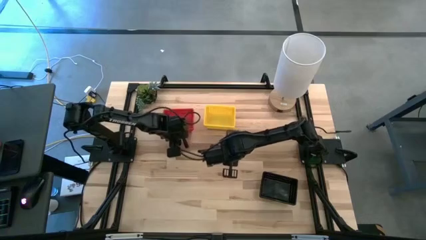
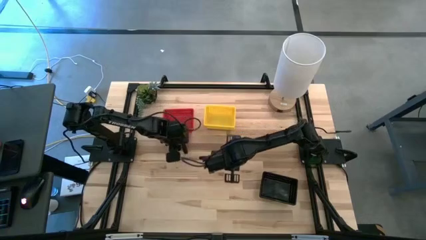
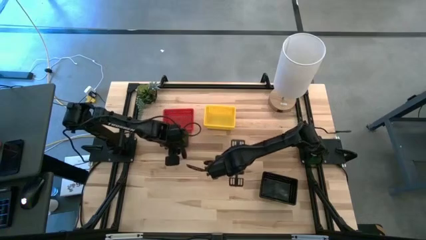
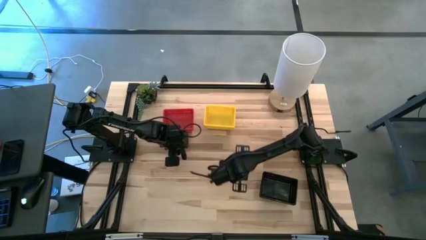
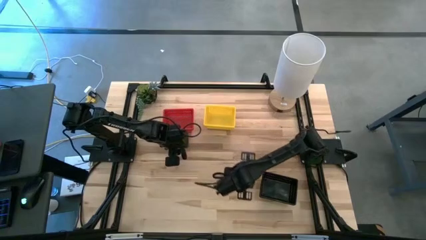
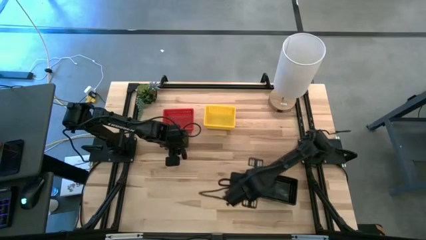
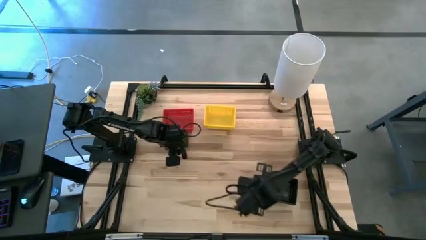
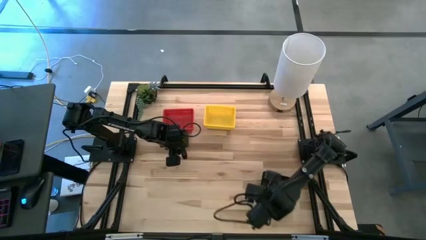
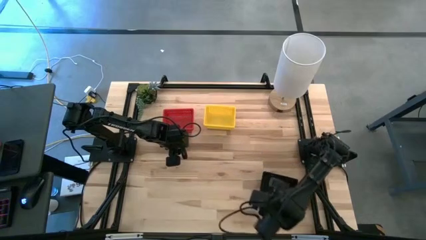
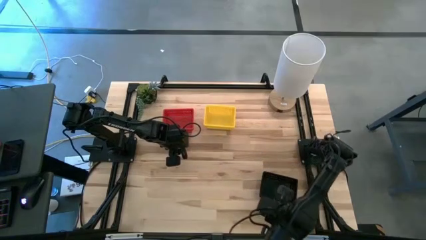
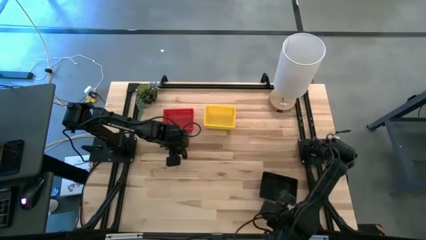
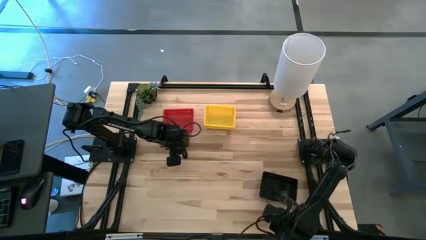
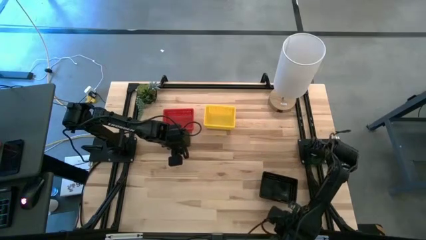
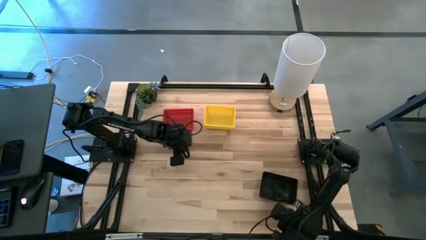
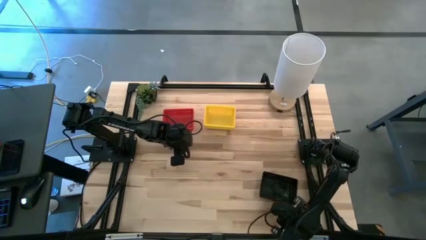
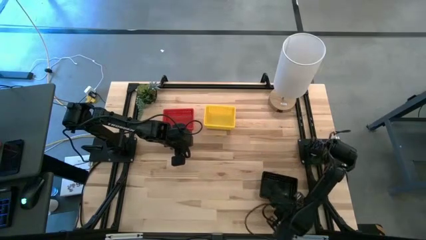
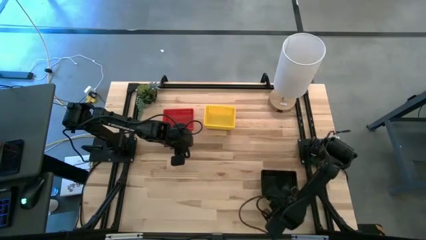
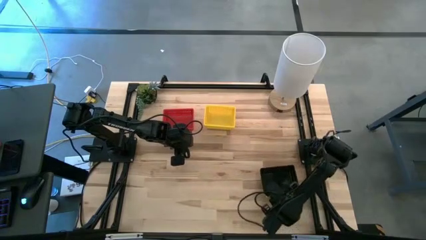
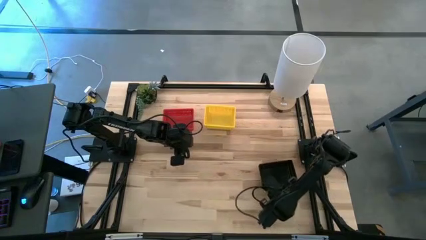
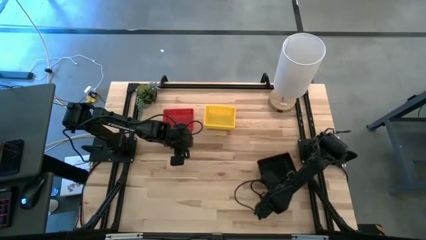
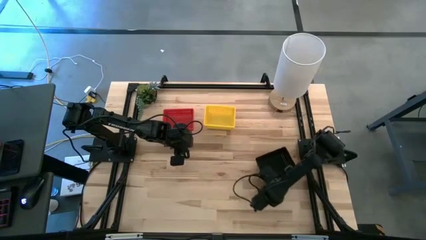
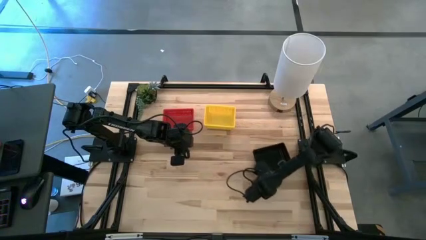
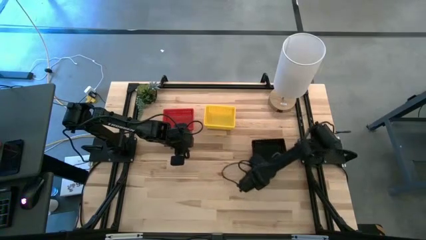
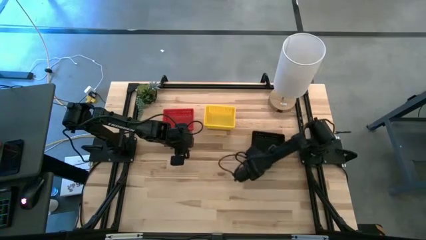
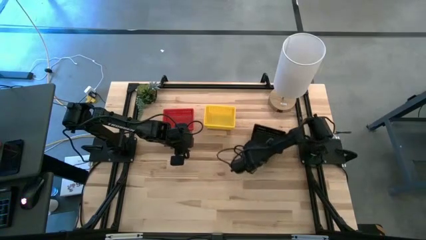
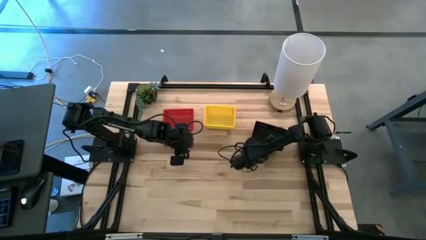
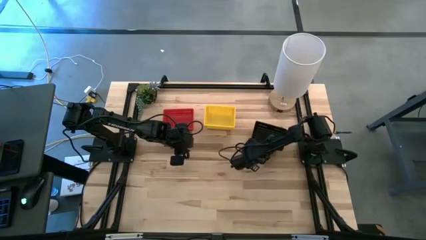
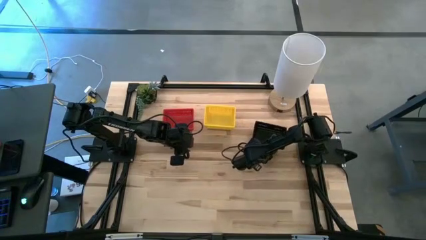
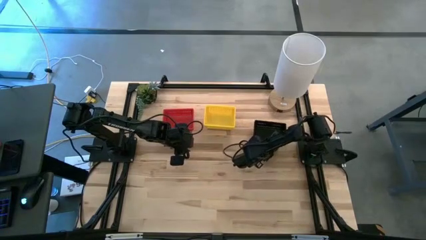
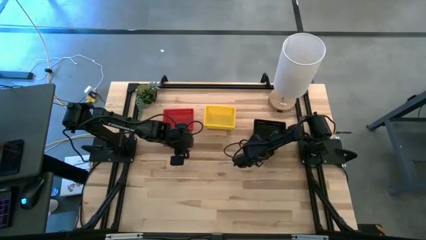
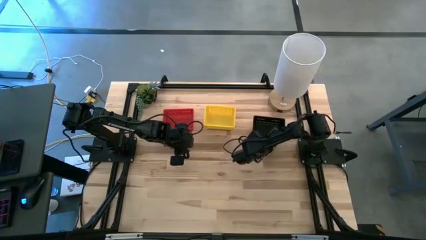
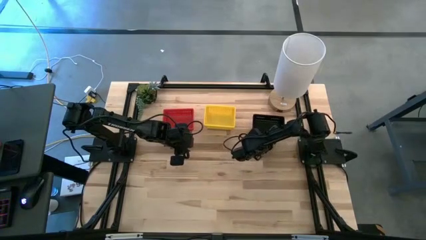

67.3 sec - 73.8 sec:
Move the stacked black bins to the top of the table

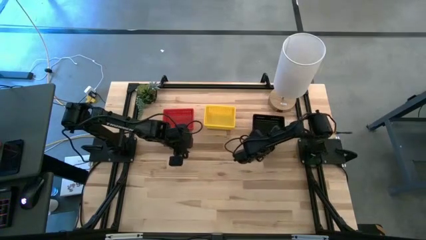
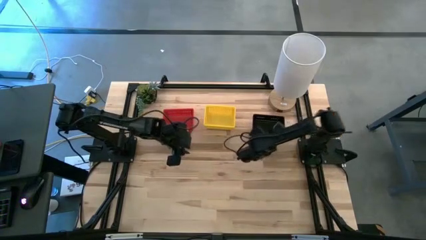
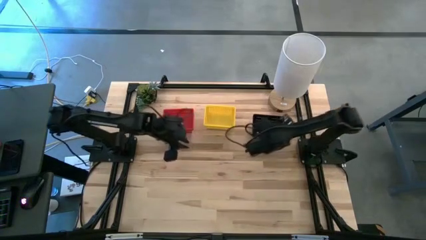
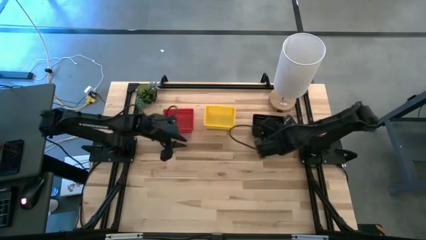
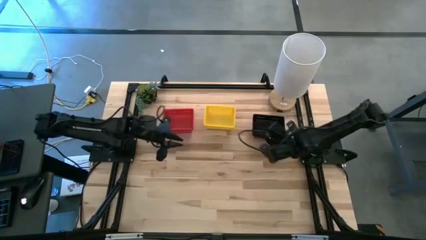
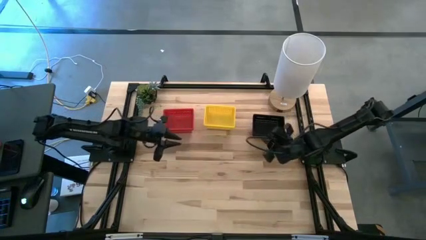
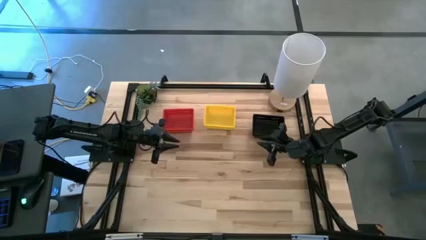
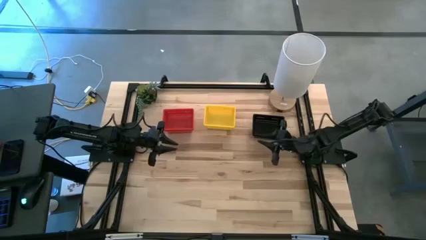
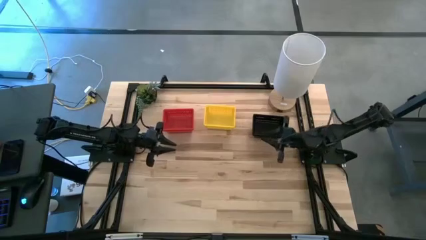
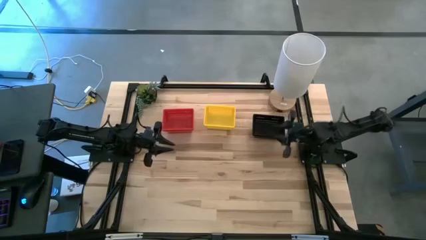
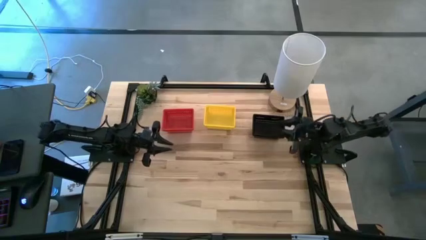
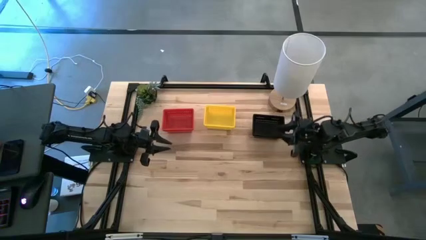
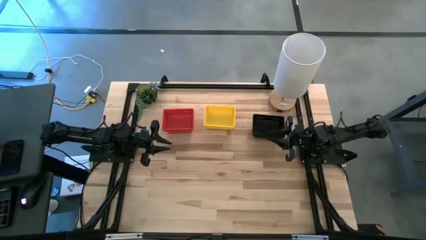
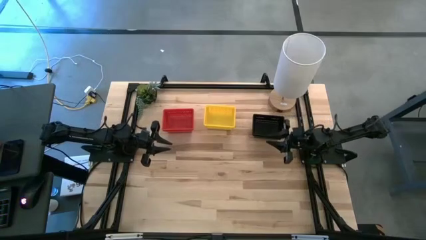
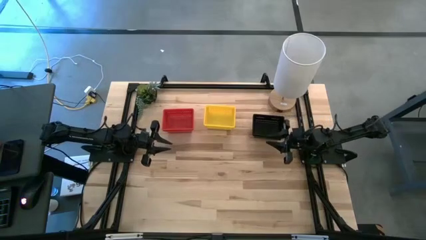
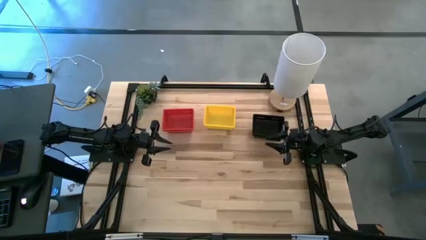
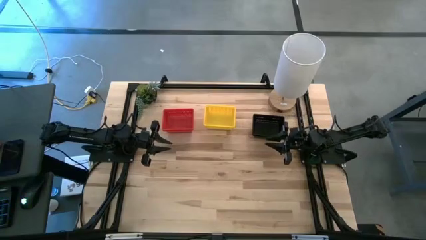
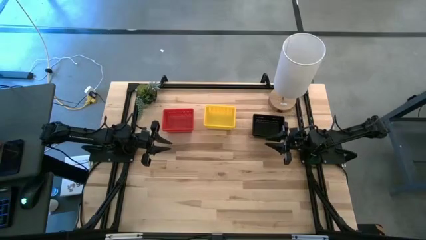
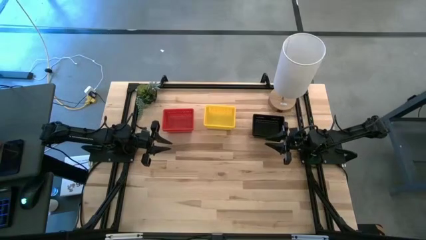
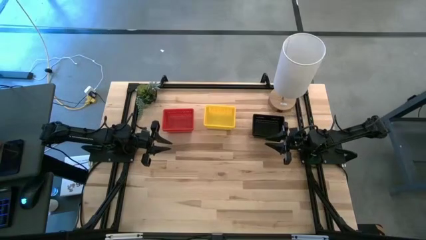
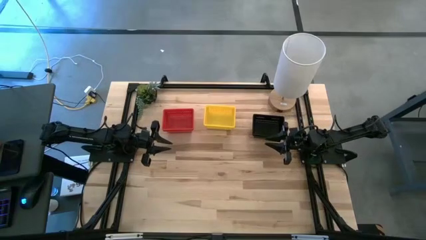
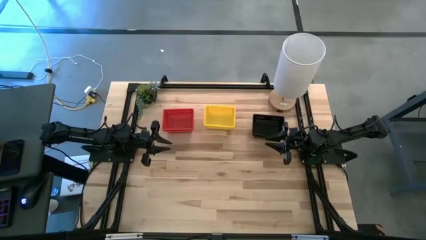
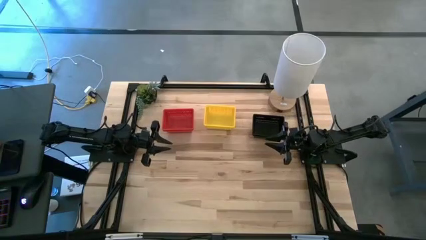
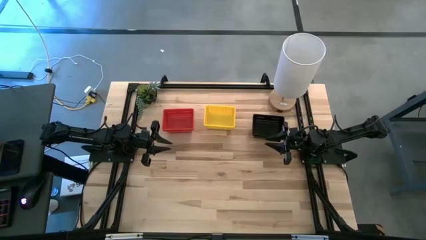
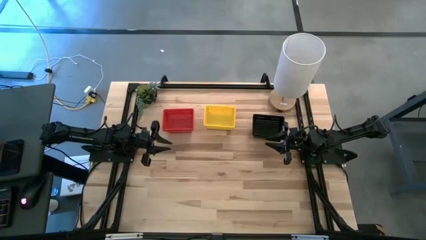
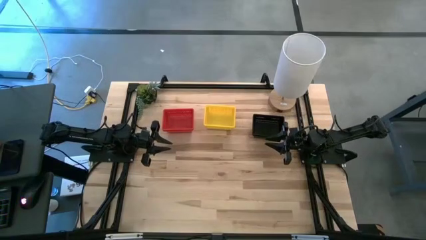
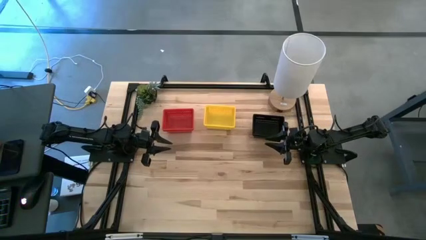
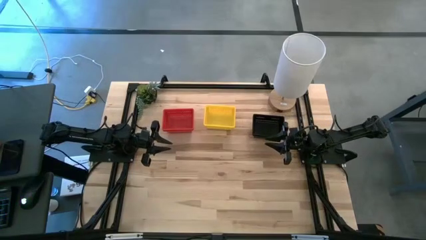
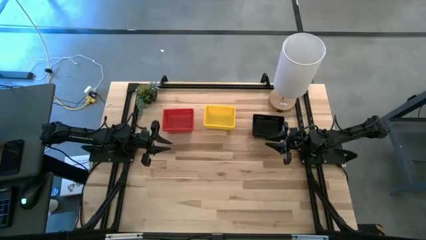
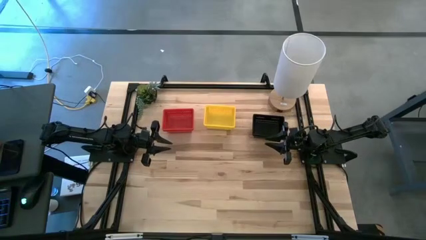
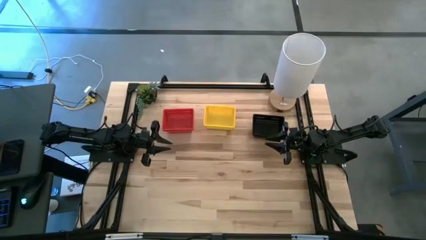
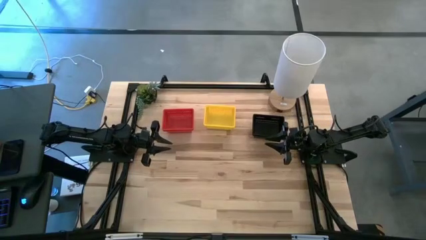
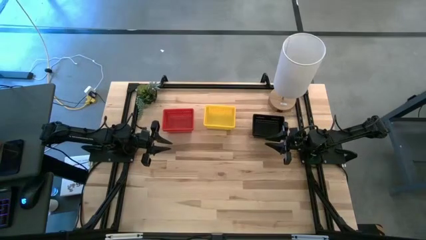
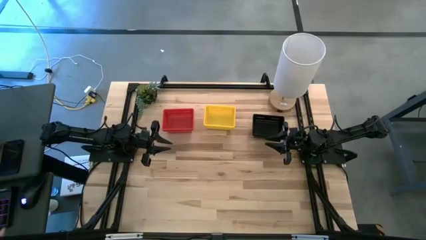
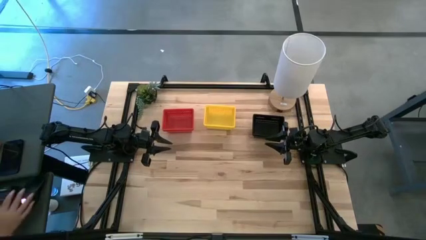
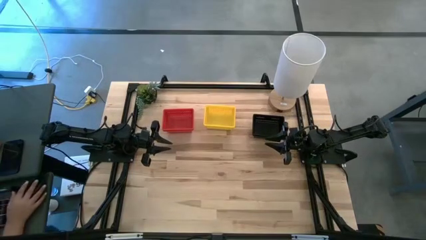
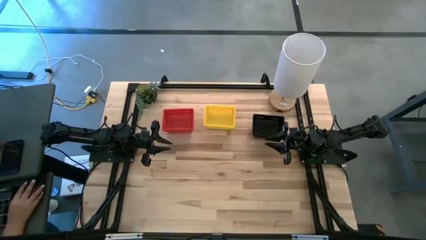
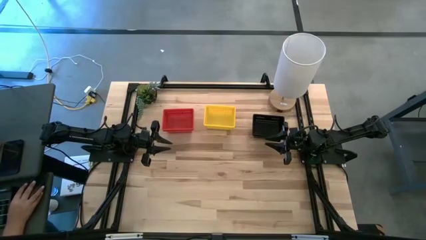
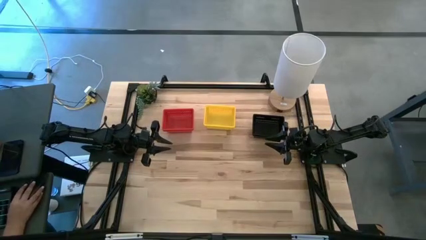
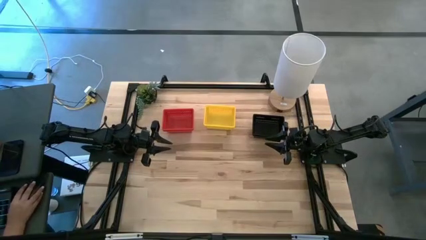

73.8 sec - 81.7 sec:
Return to Home Position
